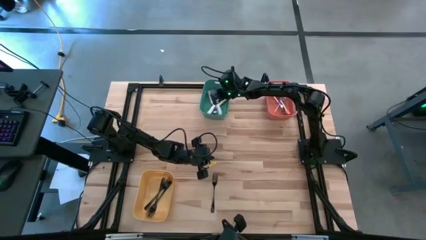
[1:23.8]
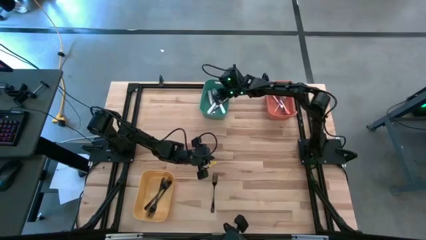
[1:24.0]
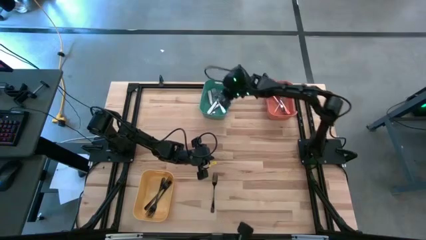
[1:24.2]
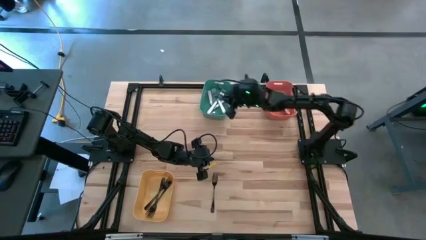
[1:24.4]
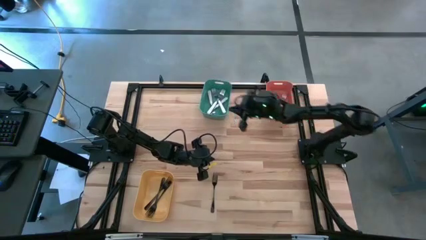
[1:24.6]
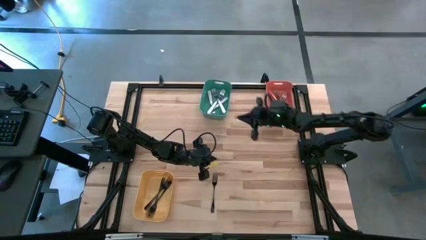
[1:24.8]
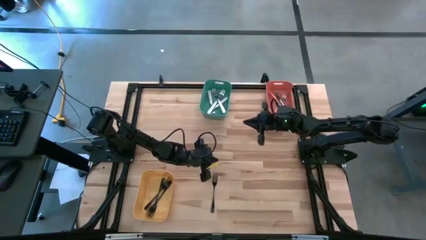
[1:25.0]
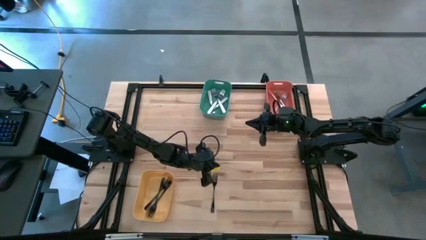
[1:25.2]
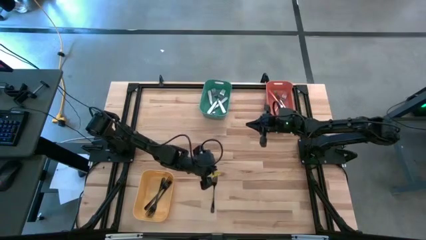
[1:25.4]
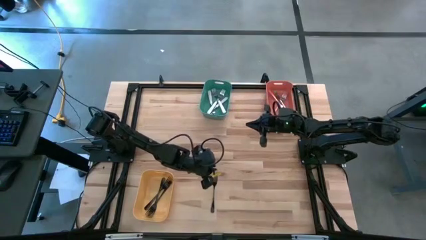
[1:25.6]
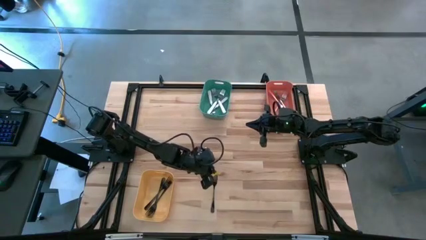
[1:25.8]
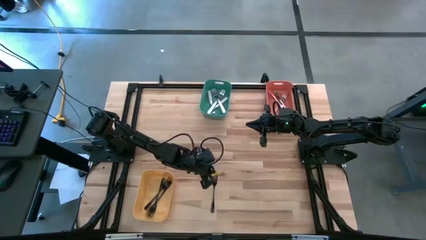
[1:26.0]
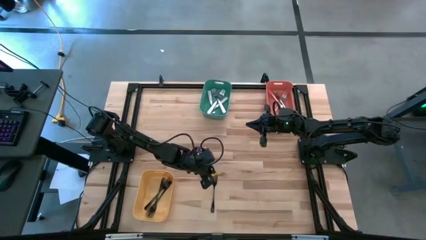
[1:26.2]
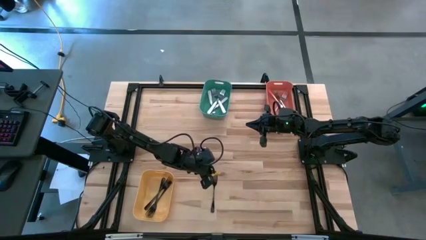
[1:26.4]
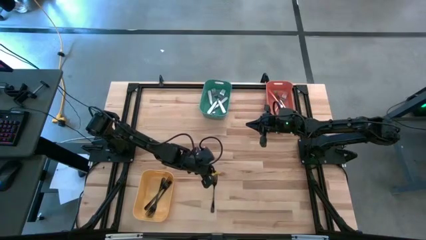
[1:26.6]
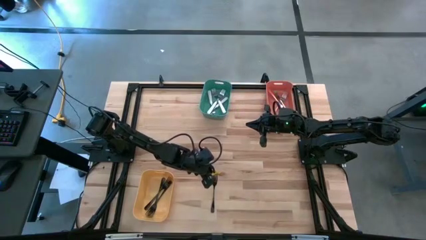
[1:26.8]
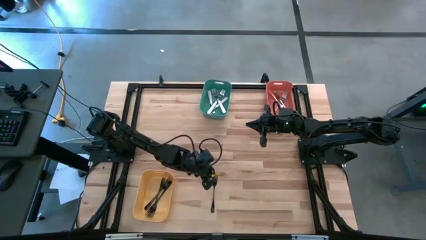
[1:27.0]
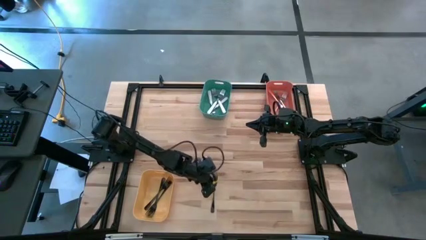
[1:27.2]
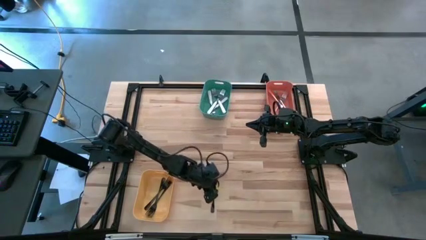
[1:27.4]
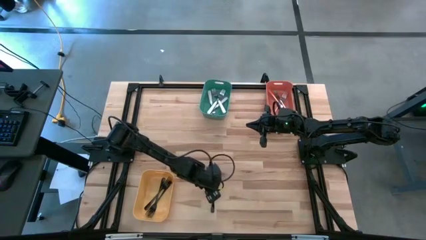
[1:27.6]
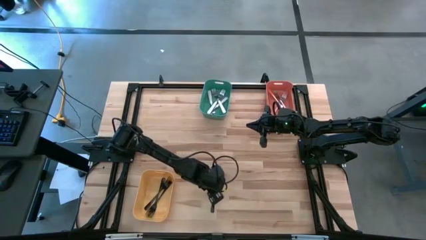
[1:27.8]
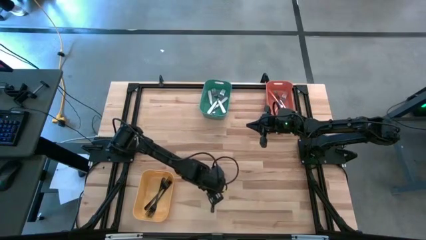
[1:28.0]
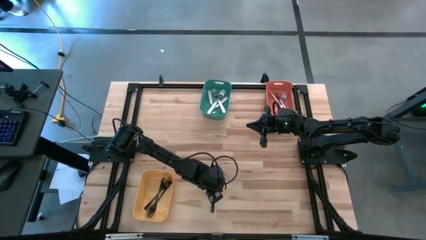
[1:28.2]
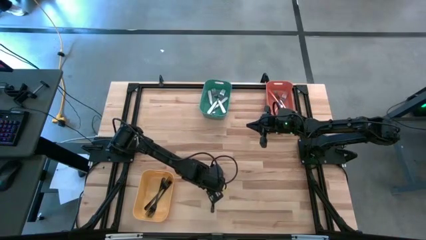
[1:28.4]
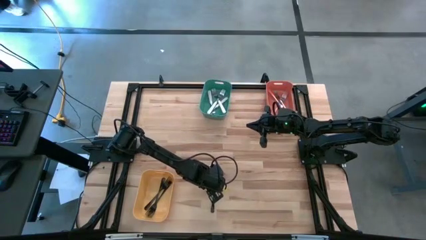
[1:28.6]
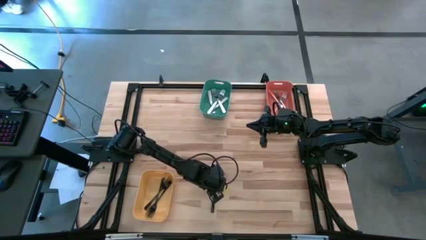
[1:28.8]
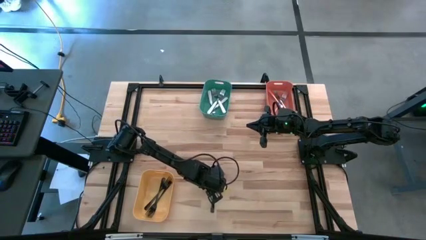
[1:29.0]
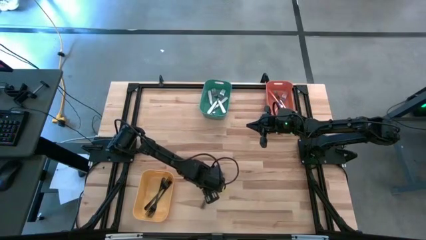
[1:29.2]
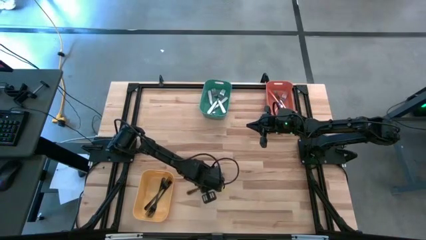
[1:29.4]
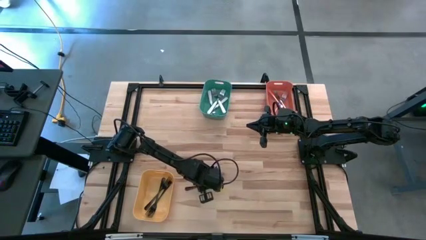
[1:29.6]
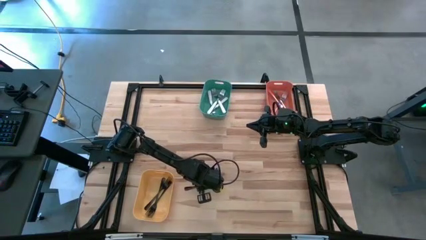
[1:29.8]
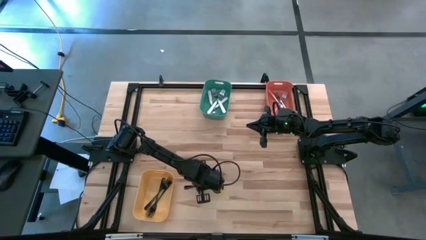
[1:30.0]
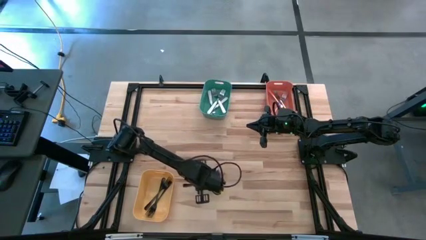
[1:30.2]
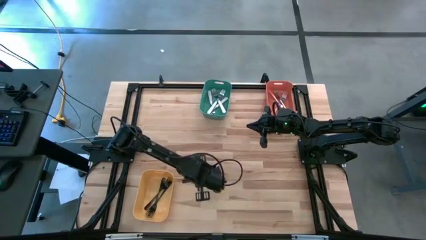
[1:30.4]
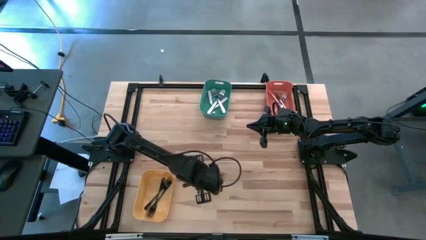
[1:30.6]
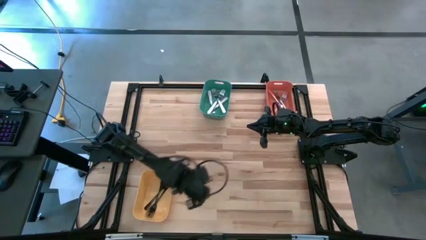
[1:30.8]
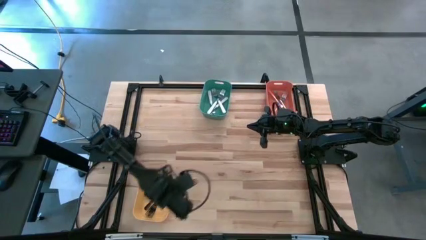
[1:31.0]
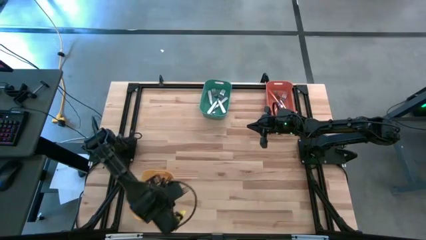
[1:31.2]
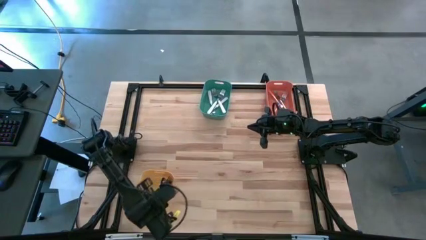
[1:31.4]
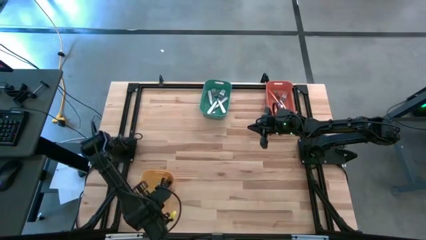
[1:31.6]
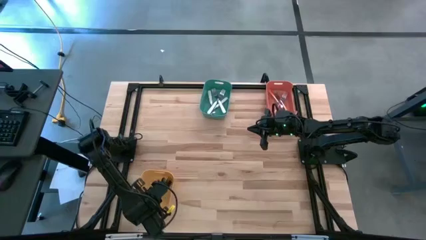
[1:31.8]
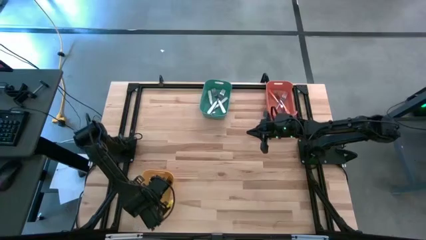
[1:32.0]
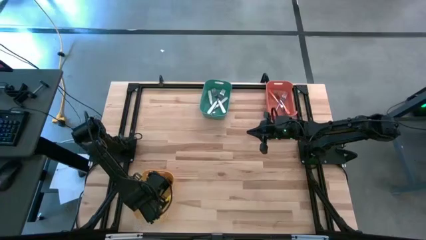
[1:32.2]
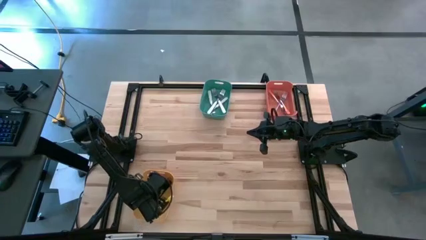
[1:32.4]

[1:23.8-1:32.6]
Task: Sort silverware by color (type)
Put the black fork into the yellow bin

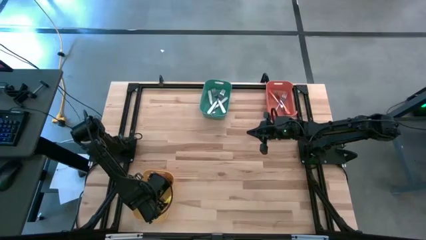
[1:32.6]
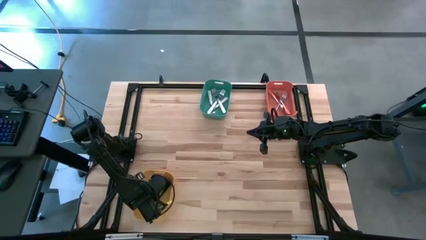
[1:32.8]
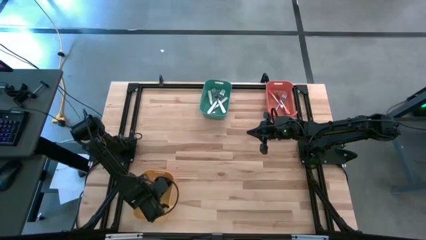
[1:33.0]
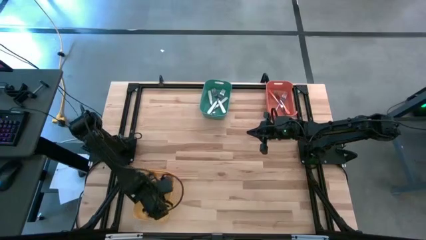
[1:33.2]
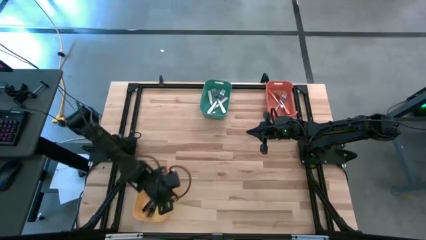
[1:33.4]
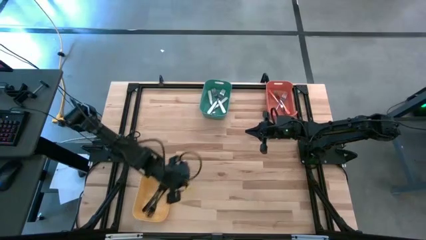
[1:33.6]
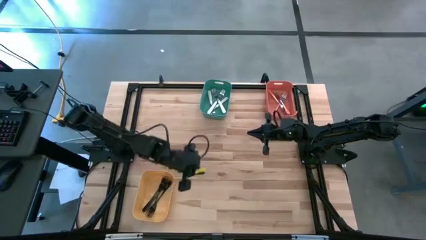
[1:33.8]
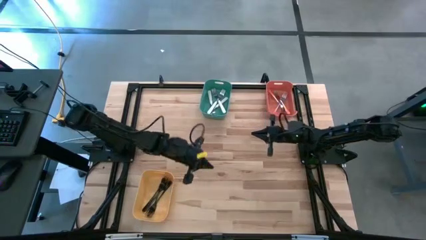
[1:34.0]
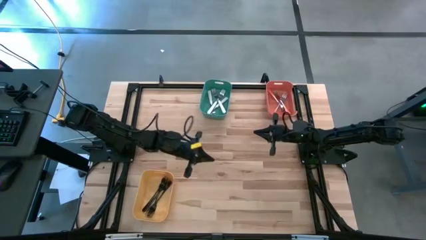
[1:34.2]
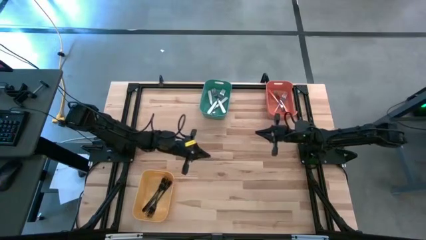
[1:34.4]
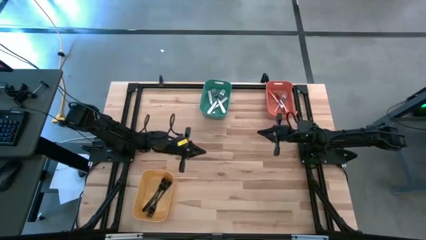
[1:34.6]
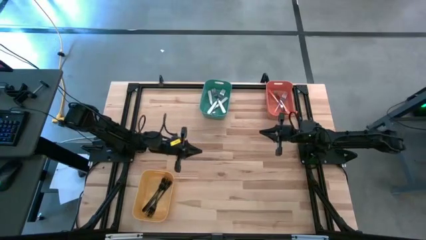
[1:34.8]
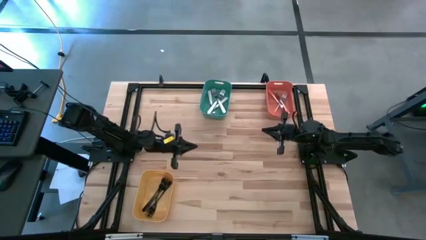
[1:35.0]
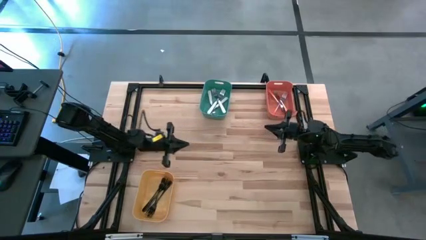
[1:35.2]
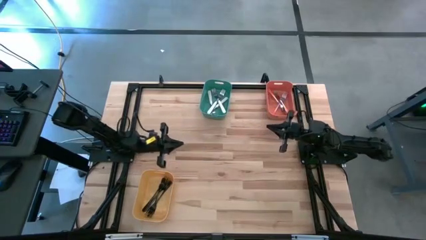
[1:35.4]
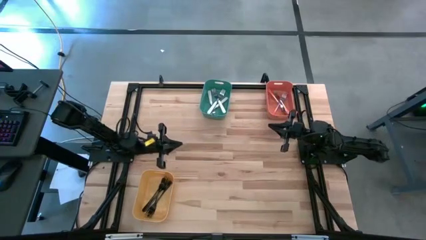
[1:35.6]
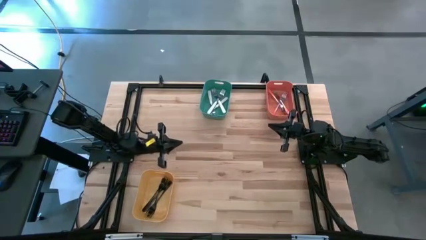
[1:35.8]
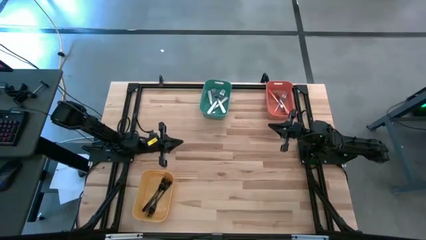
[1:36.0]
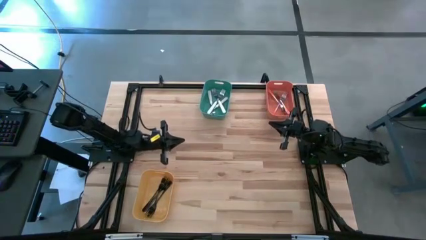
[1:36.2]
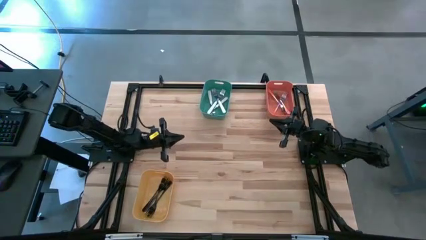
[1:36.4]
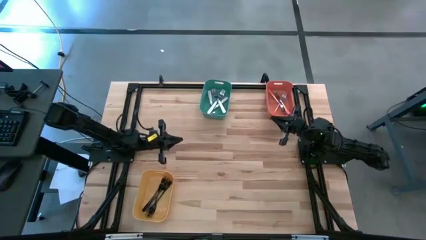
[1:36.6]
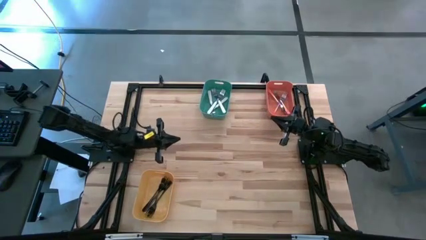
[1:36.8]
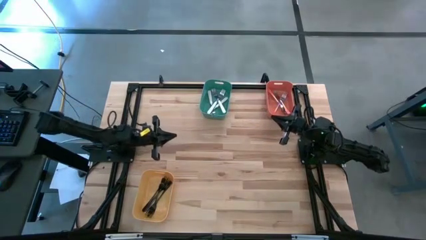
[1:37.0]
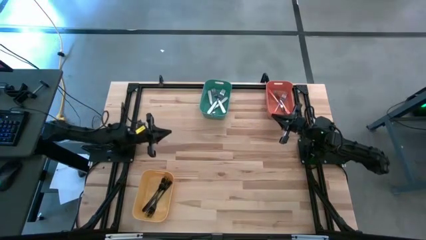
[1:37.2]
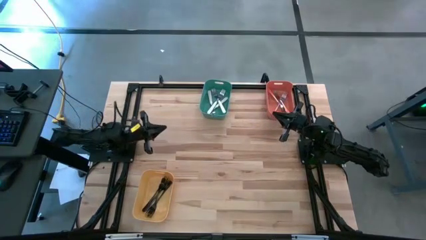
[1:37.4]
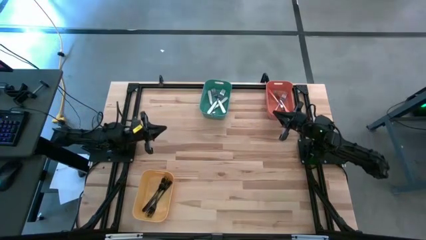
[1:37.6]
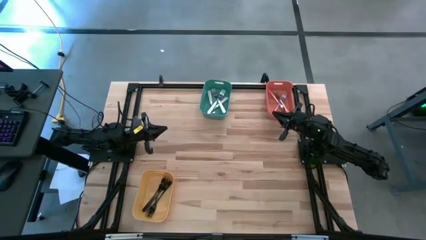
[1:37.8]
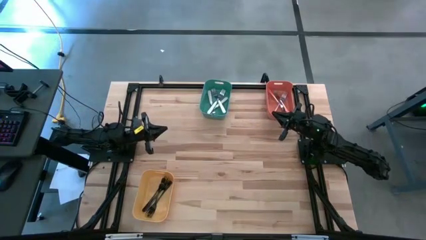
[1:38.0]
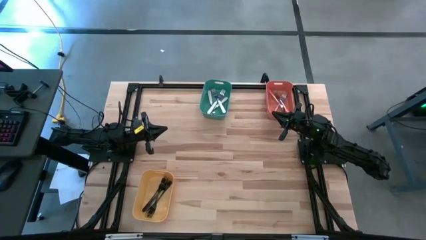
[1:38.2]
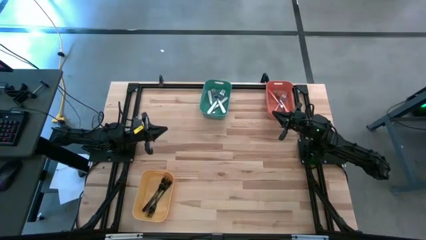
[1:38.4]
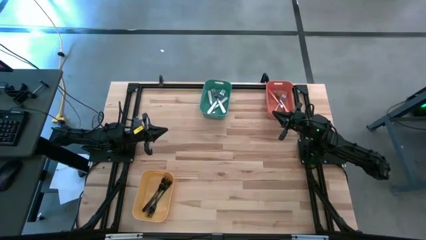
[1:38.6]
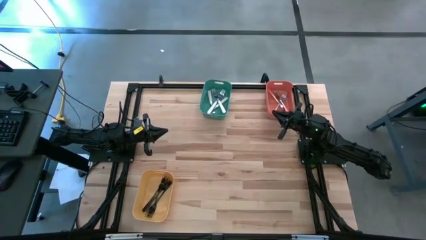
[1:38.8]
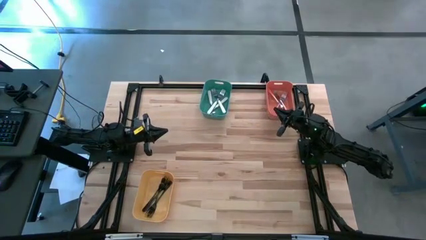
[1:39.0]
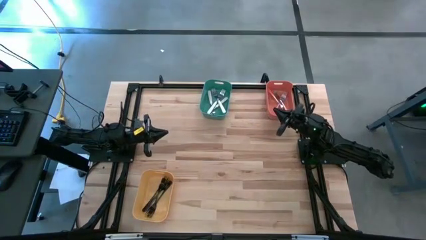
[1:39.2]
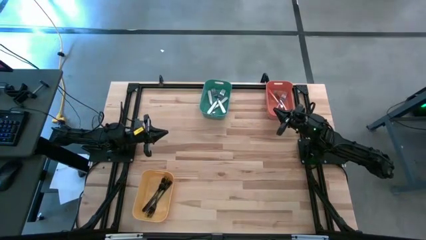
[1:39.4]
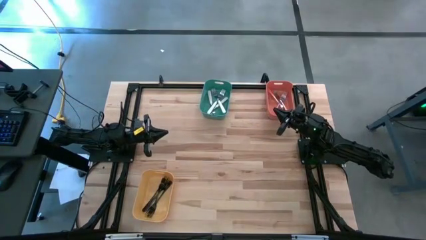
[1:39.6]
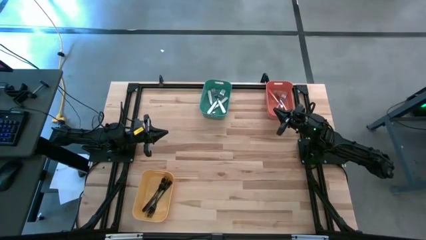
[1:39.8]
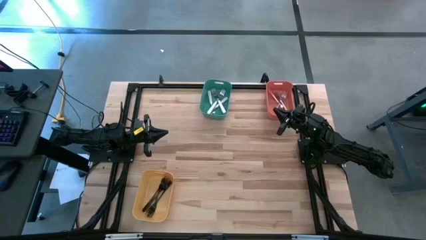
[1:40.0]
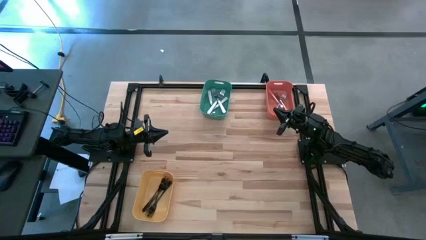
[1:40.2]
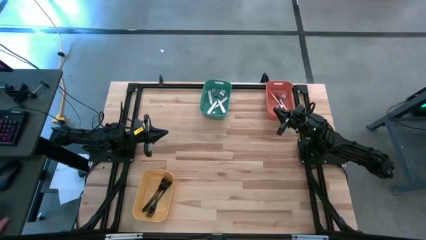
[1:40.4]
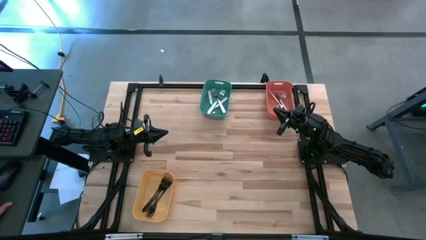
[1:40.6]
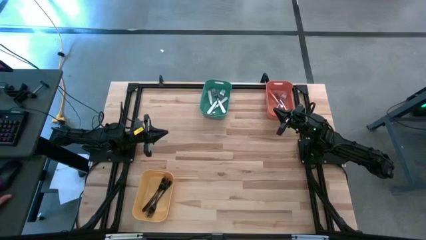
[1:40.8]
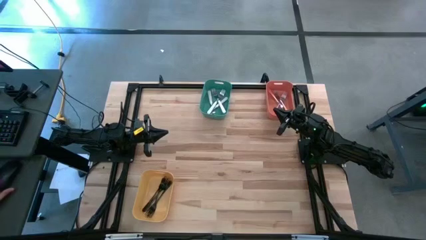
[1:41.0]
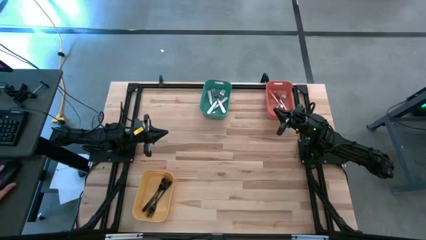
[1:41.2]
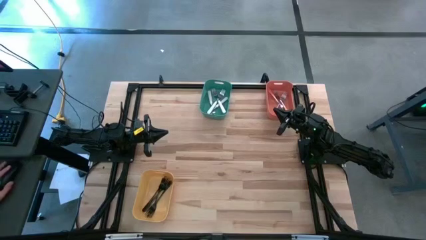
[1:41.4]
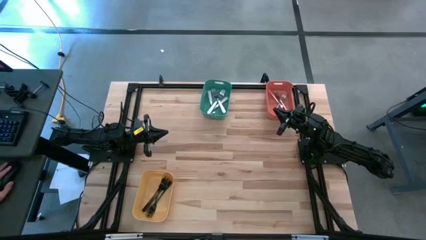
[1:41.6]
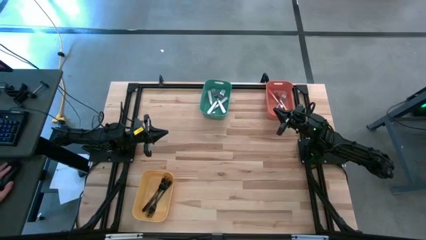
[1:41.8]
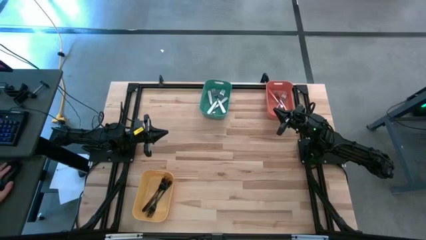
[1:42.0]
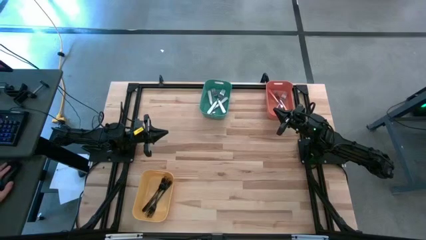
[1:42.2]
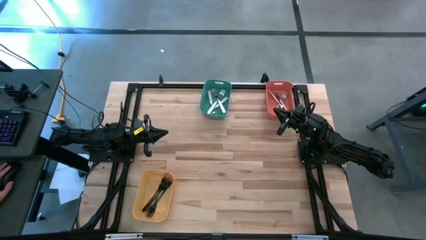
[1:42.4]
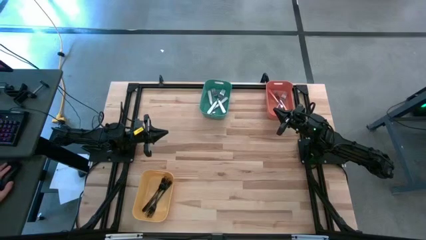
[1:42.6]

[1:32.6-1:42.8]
Return to Home Position
